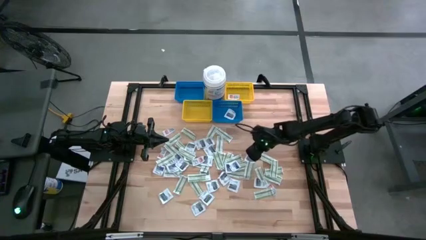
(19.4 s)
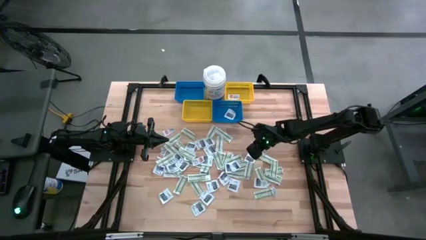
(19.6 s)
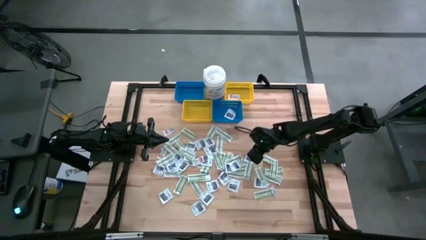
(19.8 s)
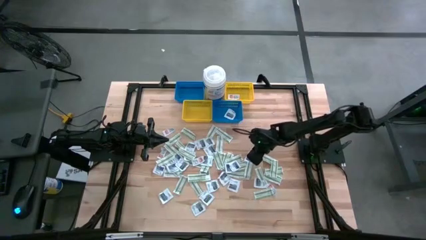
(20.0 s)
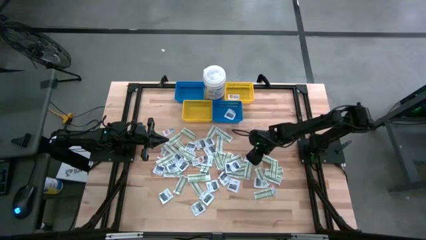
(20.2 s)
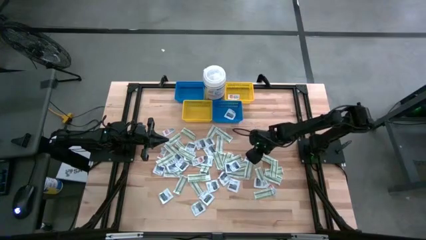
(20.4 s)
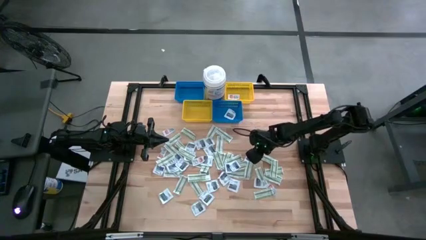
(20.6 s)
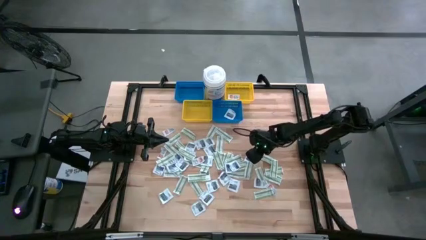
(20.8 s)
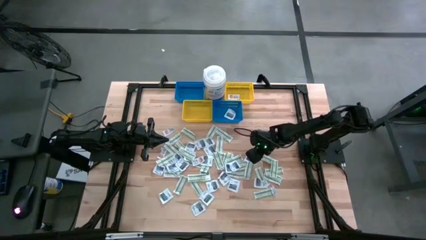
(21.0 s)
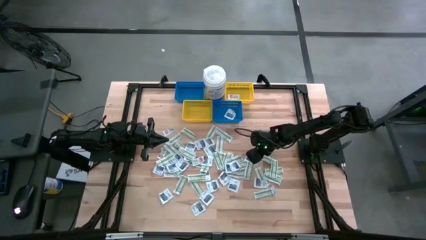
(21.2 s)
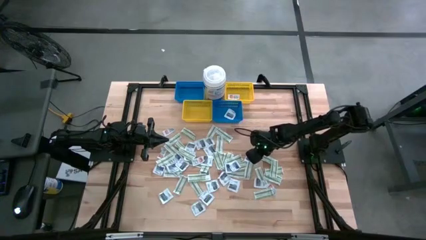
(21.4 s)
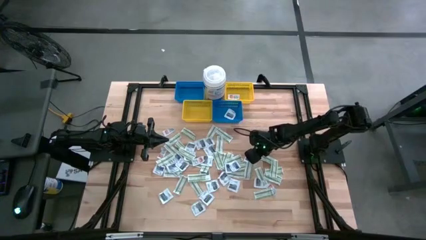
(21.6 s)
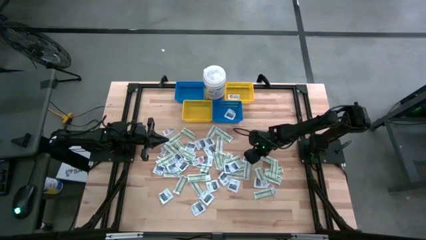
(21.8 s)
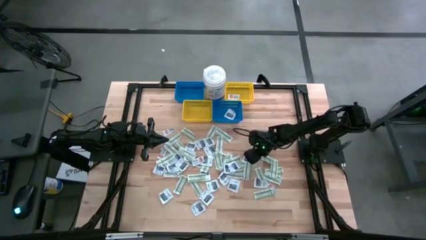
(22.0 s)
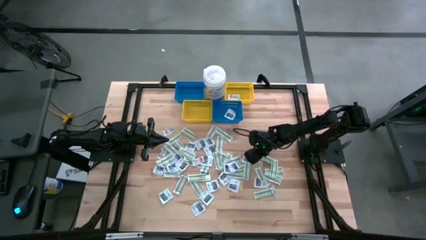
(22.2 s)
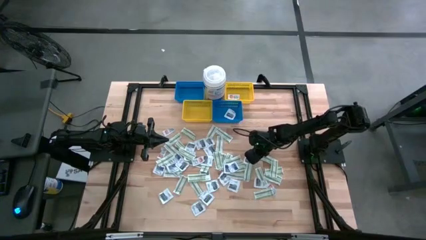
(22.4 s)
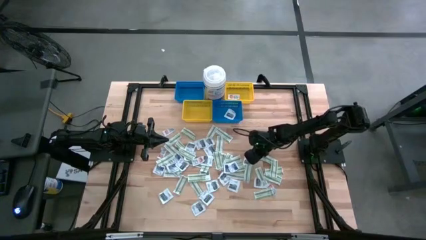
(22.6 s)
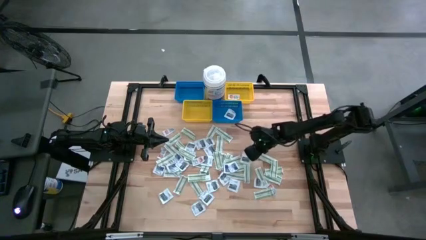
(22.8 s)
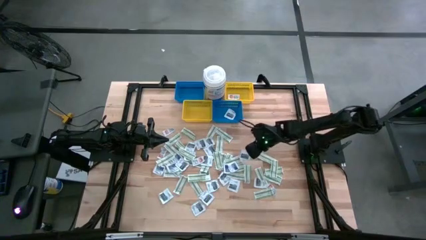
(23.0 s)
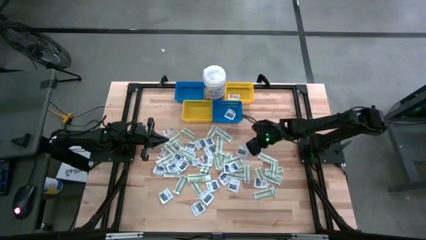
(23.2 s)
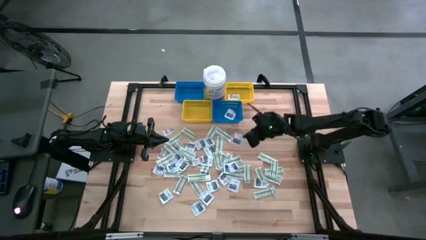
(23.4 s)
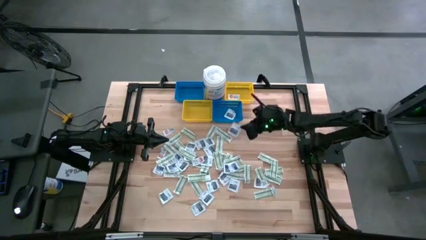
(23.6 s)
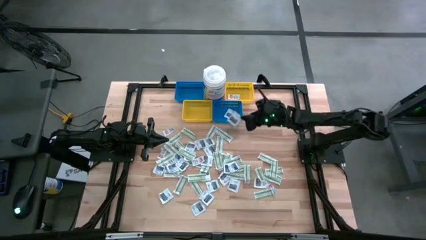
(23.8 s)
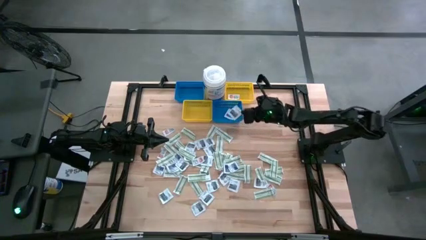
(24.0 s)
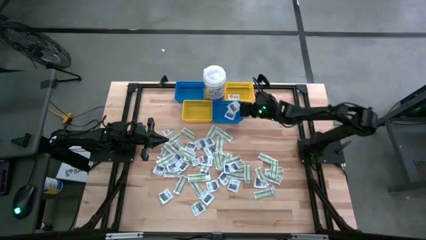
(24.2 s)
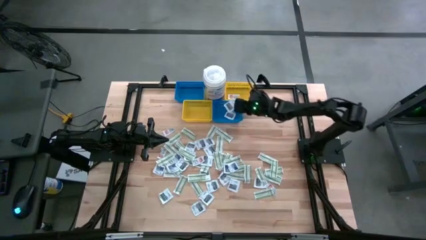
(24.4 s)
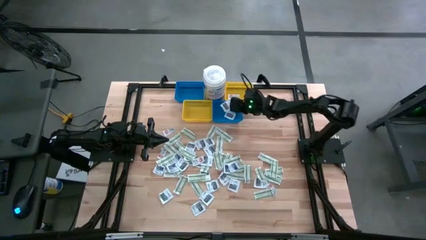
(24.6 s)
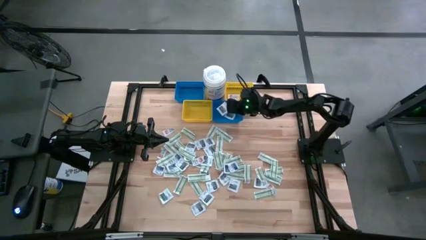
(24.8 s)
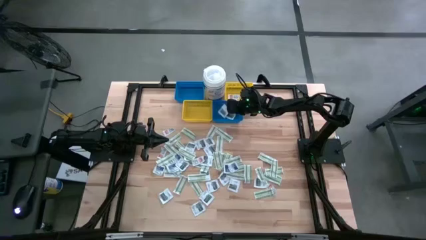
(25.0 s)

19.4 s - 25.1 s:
Task: Pick & Place First Aid Supplies
Put the black towelette pack into the right blue bin

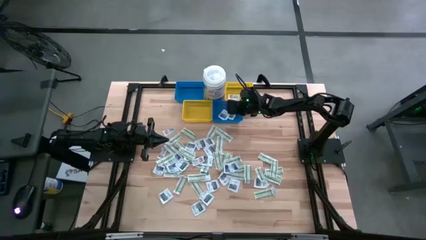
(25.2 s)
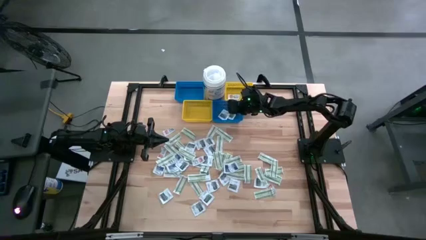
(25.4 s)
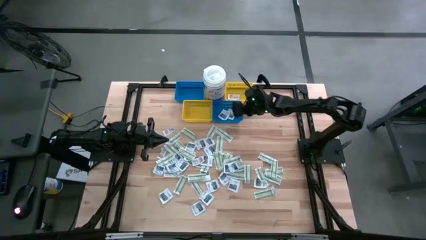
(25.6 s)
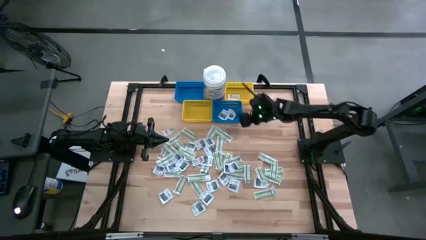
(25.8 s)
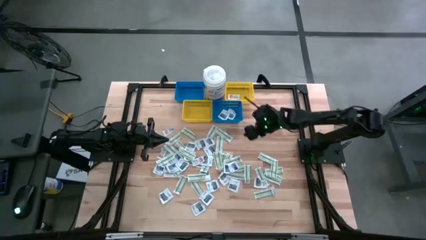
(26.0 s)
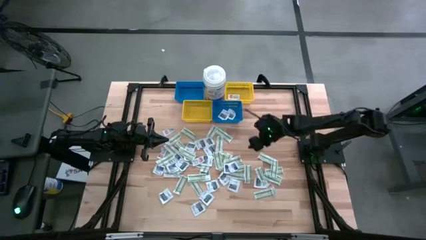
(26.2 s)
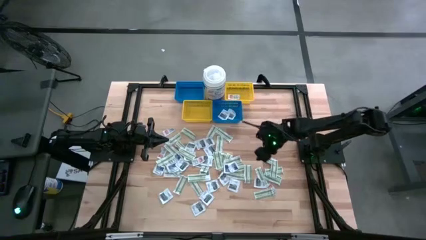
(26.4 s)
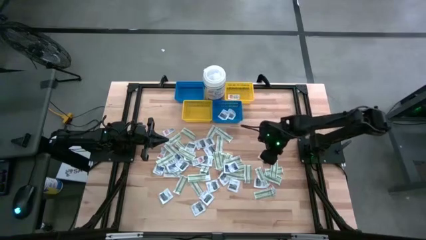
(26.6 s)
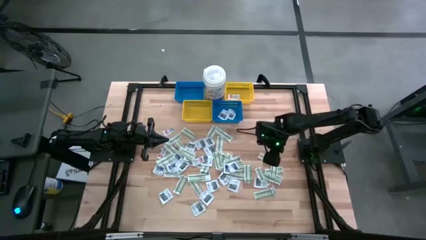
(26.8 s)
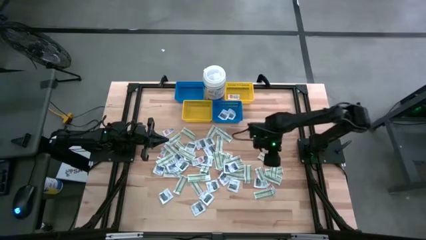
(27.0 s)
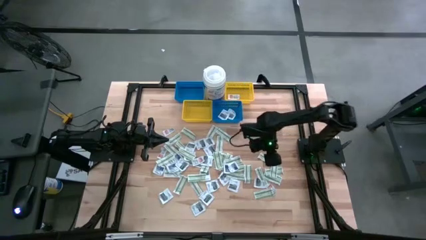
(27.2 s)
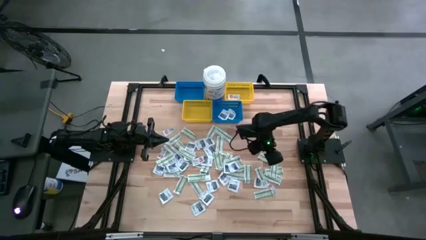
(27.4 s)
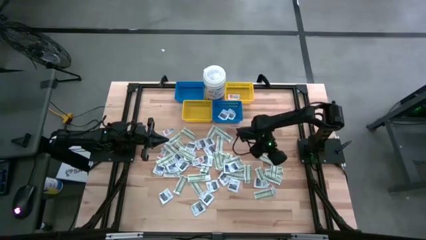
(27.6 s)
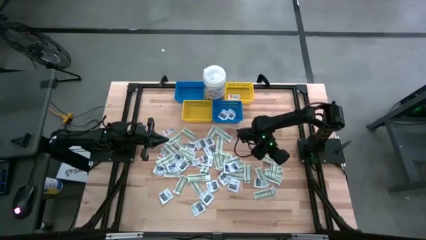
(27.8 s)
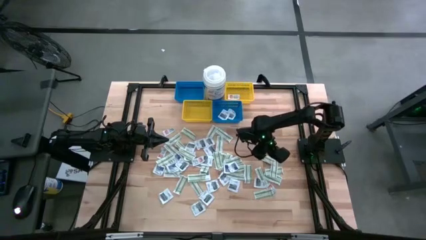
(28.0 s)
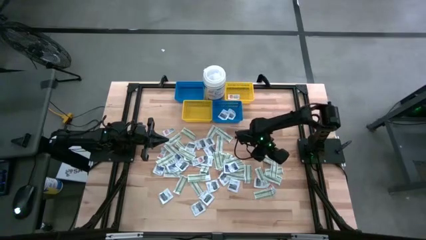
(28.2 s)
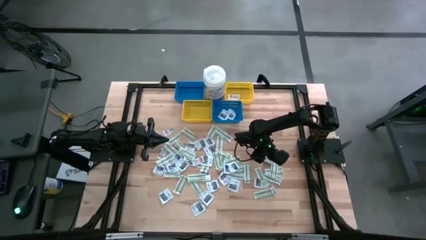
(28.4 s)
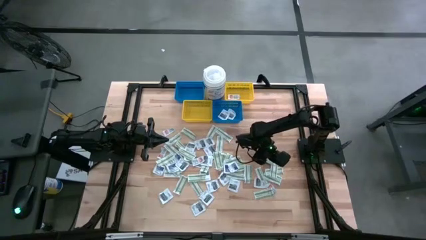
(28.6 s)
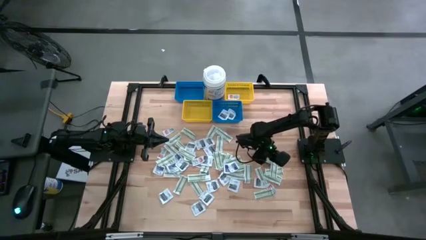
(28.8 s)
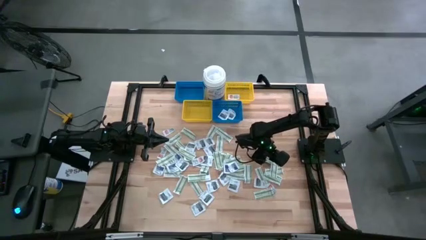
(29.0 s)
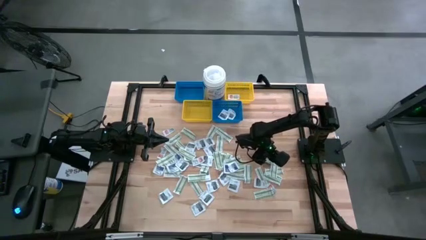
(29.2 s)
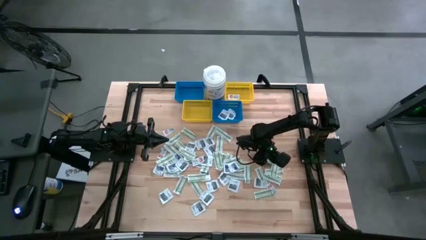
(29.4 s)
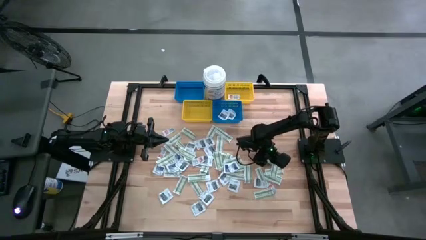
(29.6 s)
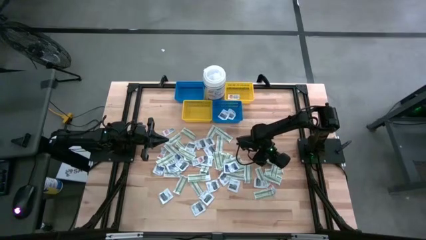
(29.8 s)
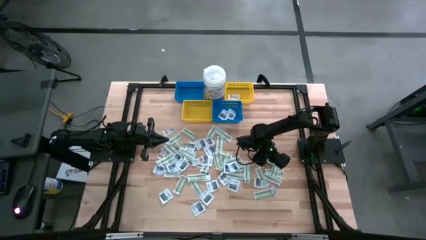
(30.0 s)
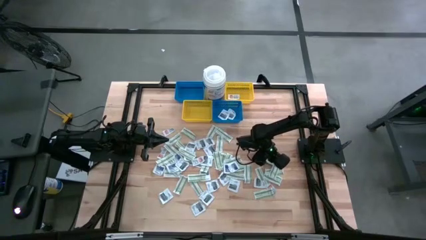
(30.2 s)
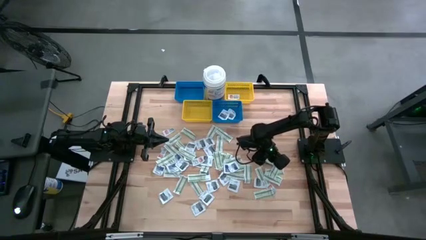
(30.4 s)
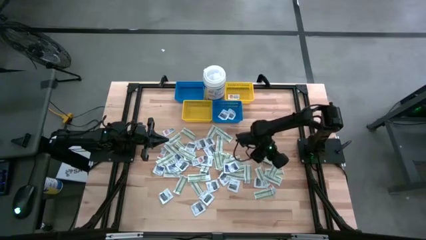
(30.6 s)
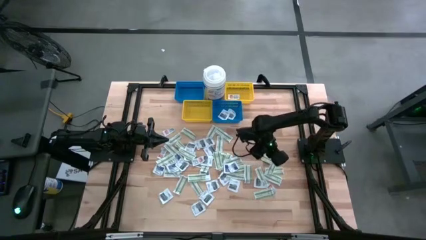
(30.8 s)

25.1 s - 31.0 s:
Put the green bandage pad into the left yellow bin

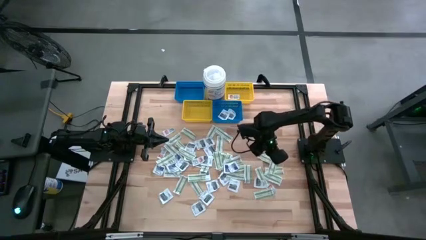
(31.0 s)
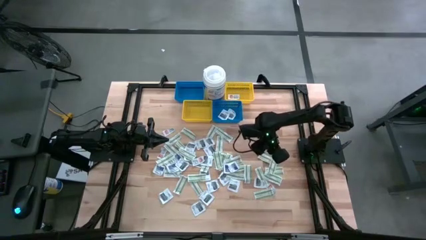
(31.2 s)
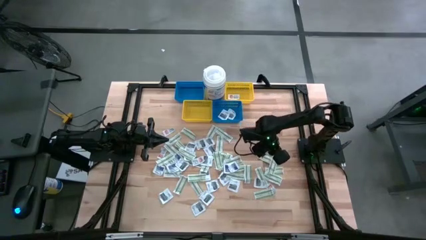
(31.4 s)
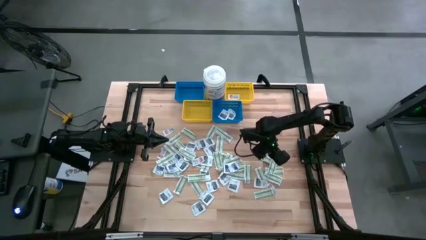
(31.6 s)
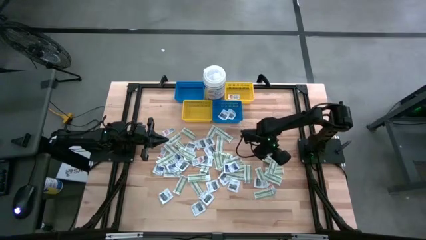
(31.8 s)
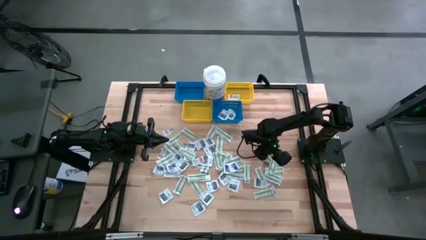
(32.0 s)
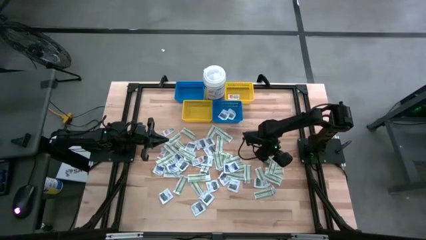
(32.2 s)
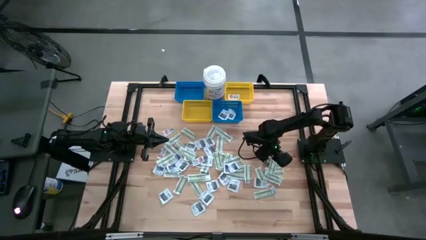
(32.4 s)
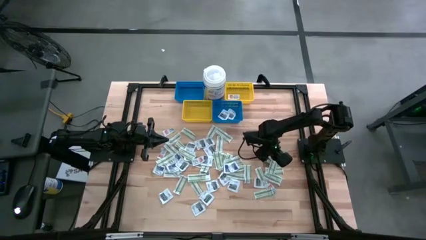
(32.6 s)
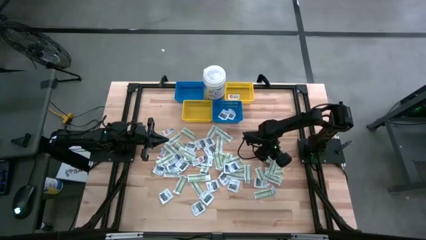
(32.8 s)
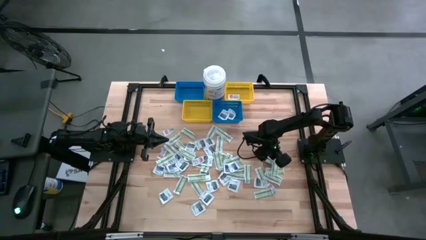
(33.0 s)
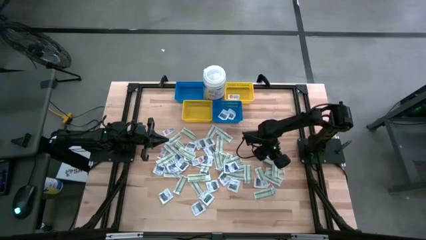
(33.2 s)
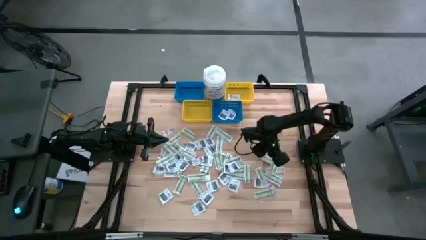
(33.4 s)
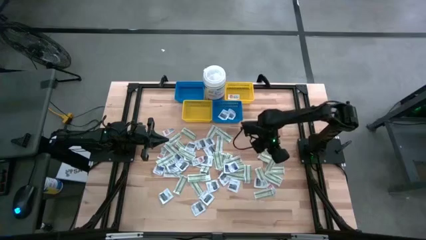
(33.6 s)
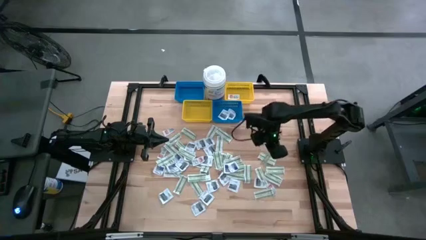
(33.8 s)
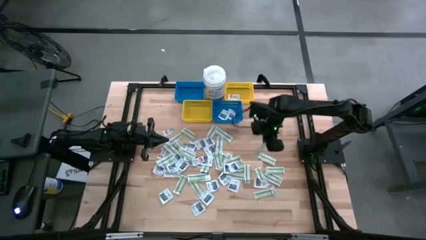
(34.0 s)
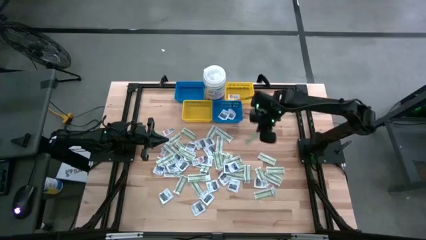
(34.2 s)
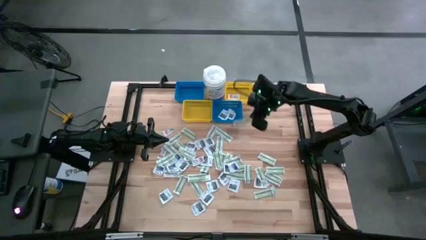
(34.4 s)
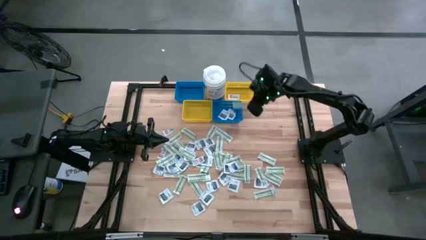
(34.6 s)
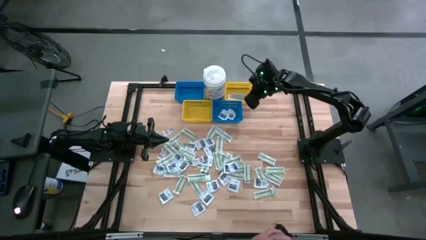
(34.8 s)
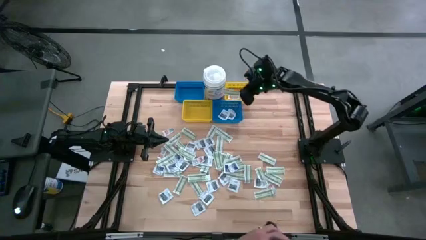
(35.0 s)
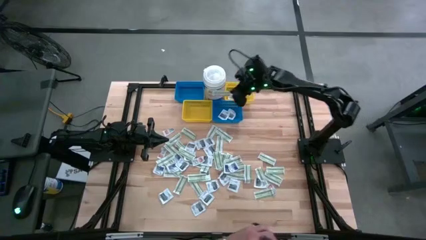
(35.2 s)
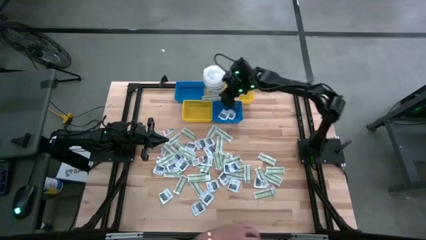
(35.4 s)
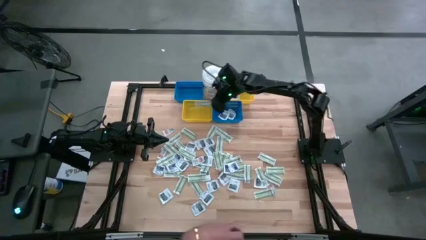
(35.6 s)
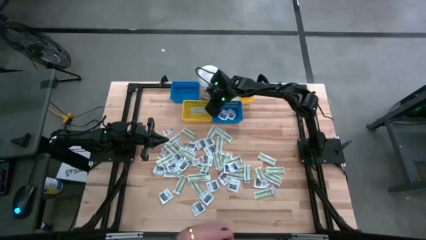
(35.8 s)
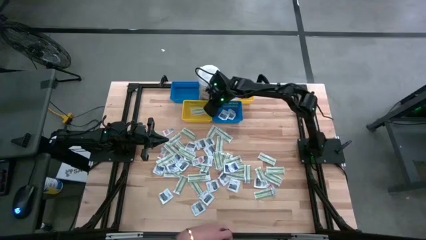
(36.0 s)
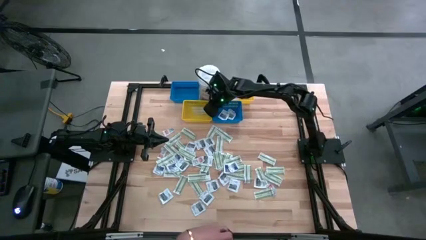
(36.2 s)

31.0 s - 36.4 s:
Put the green bandage pad into the left yellow bin
